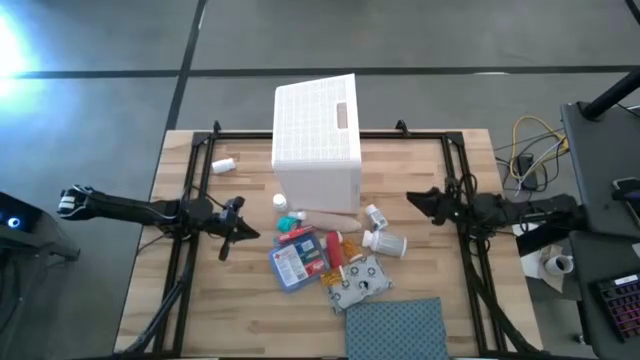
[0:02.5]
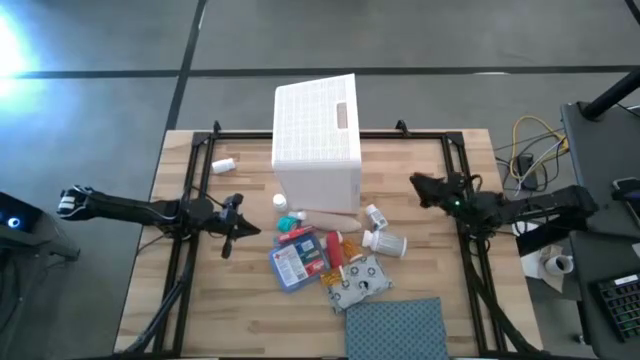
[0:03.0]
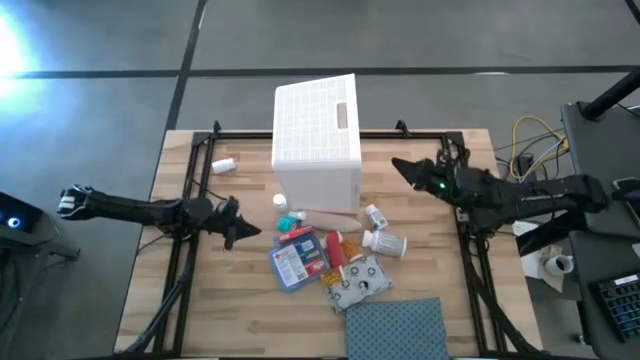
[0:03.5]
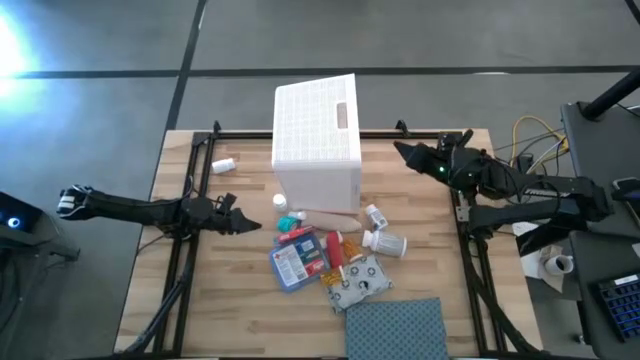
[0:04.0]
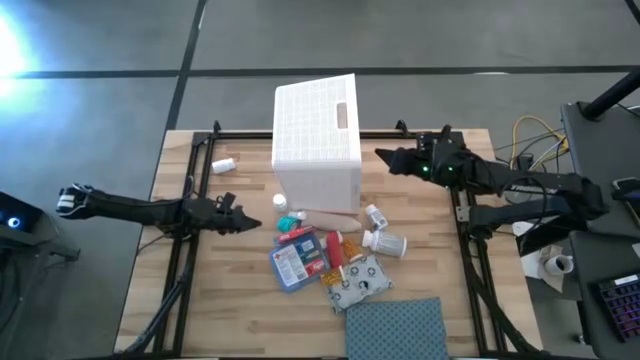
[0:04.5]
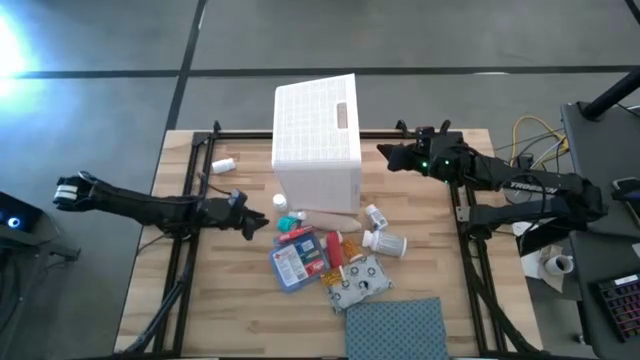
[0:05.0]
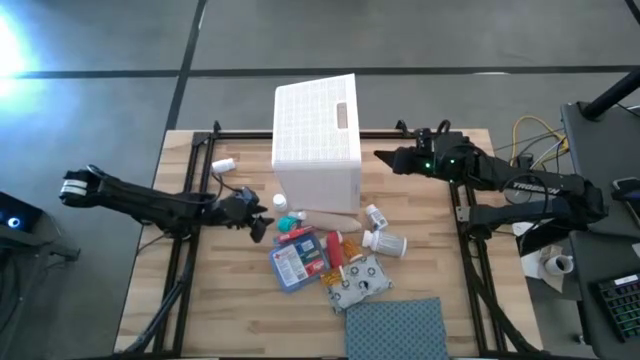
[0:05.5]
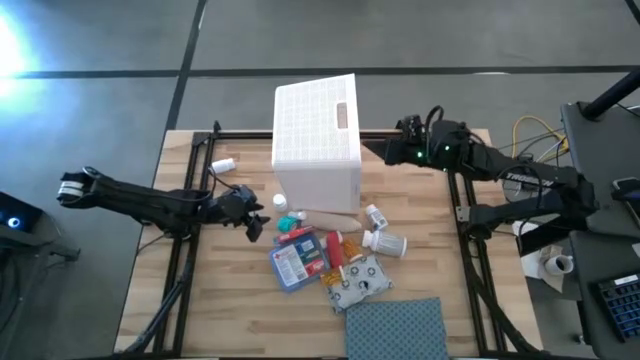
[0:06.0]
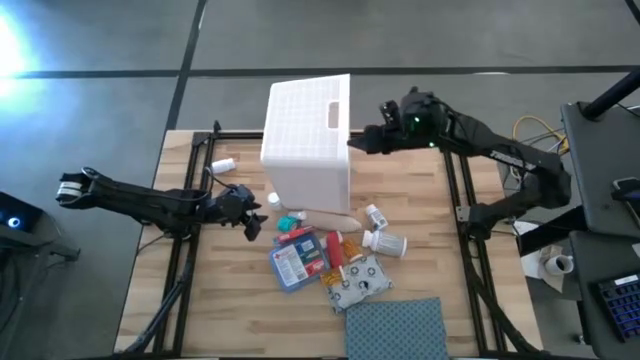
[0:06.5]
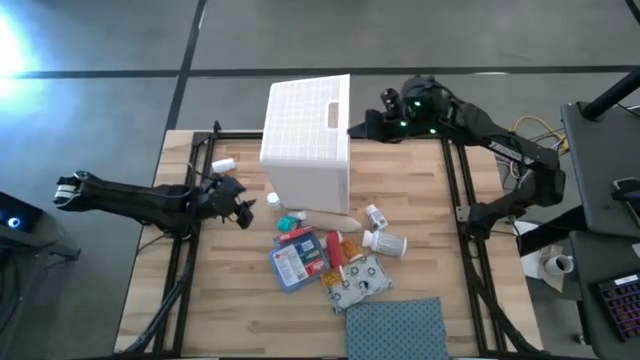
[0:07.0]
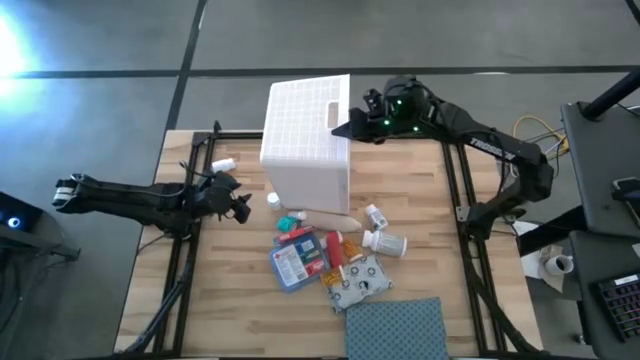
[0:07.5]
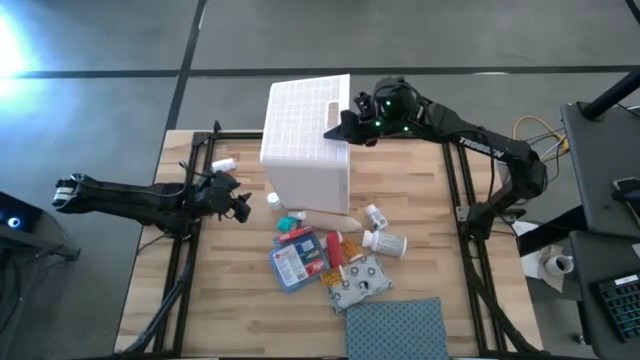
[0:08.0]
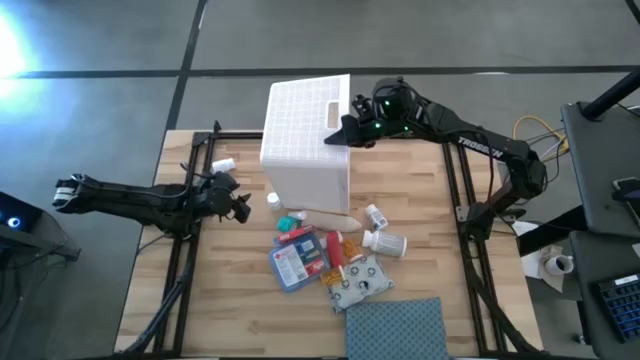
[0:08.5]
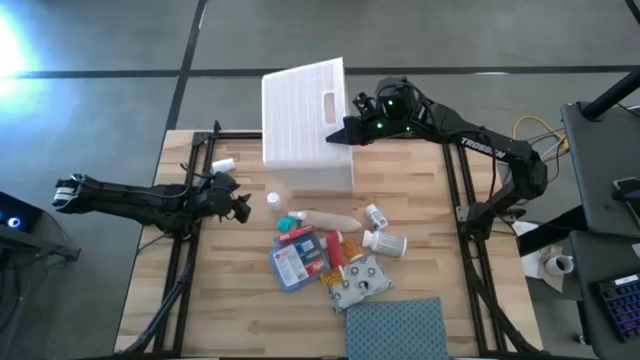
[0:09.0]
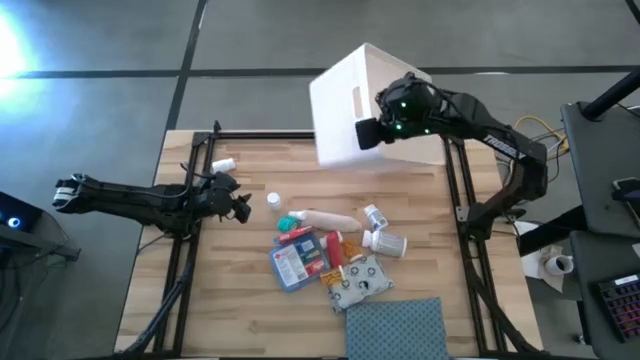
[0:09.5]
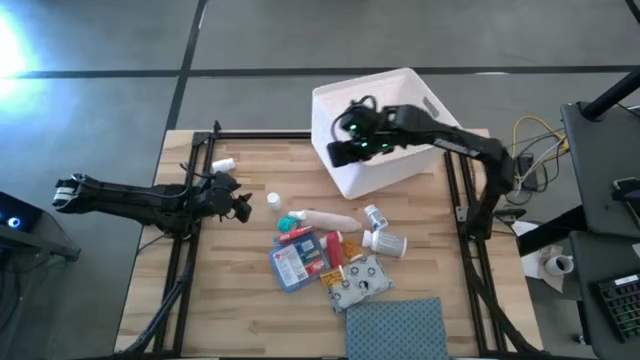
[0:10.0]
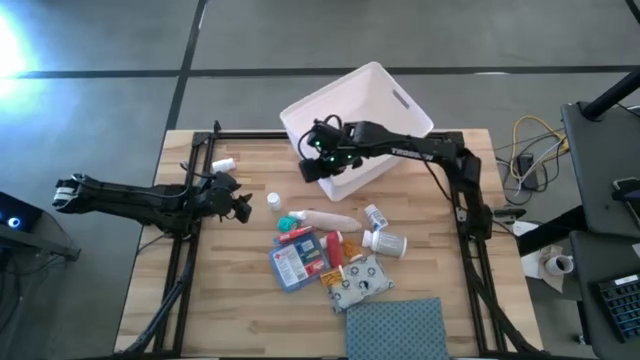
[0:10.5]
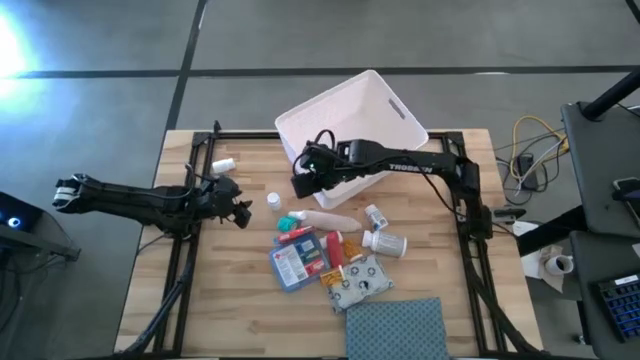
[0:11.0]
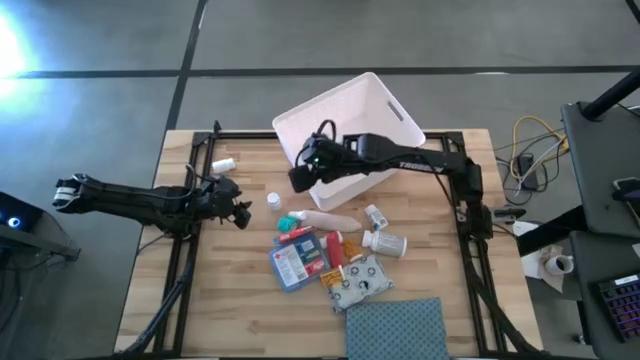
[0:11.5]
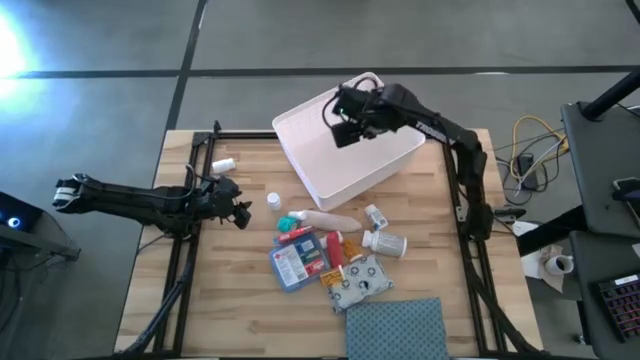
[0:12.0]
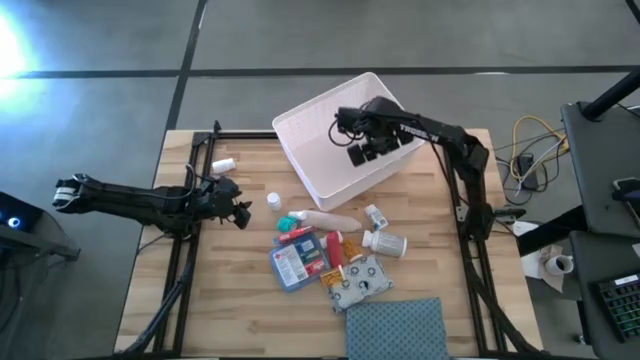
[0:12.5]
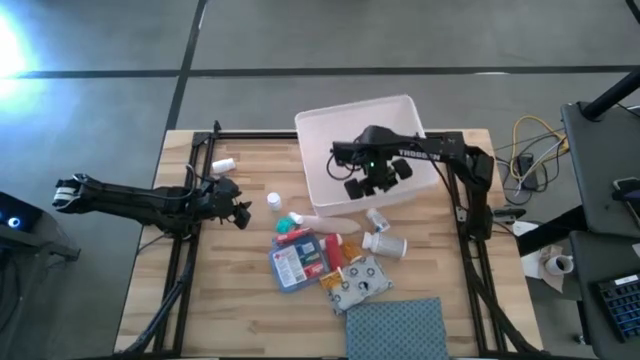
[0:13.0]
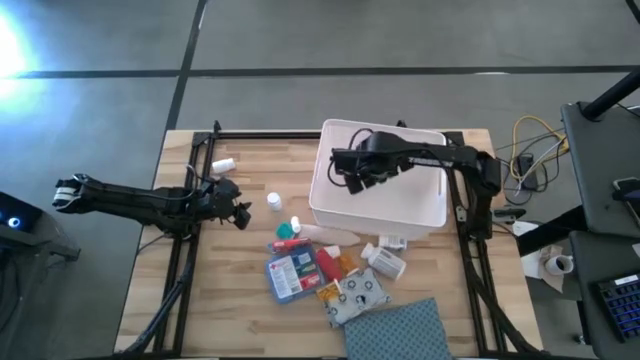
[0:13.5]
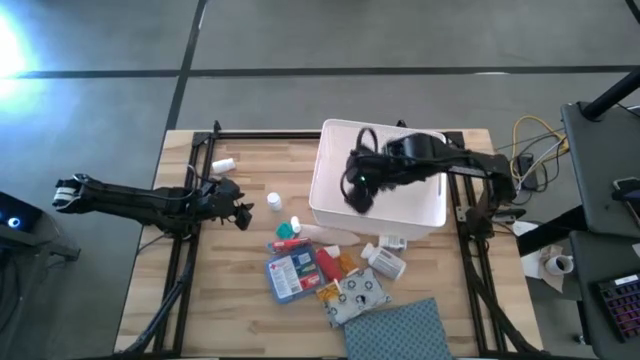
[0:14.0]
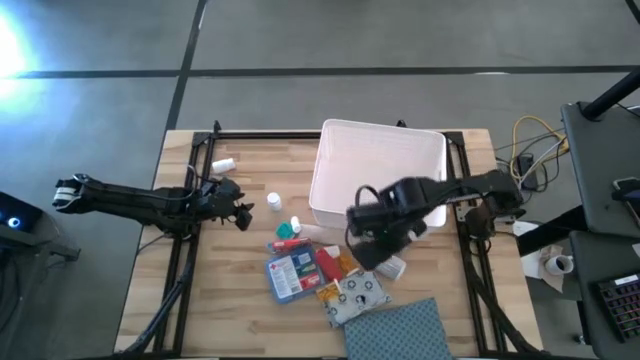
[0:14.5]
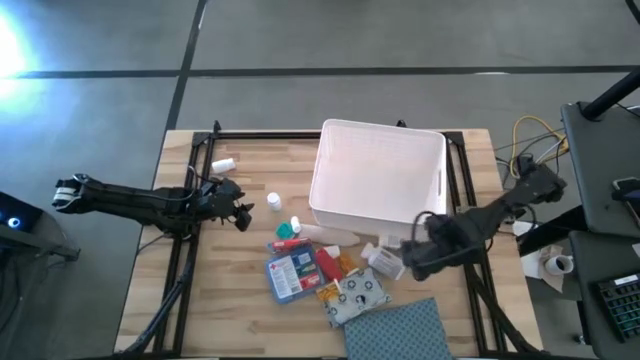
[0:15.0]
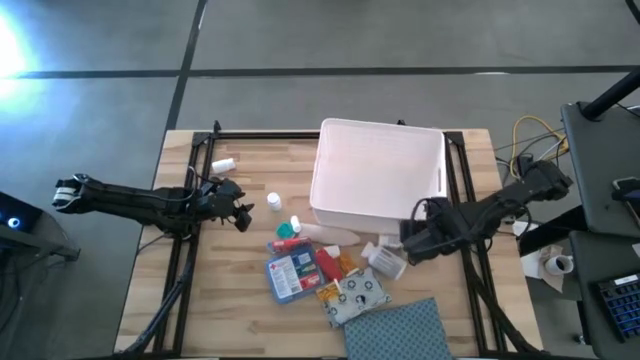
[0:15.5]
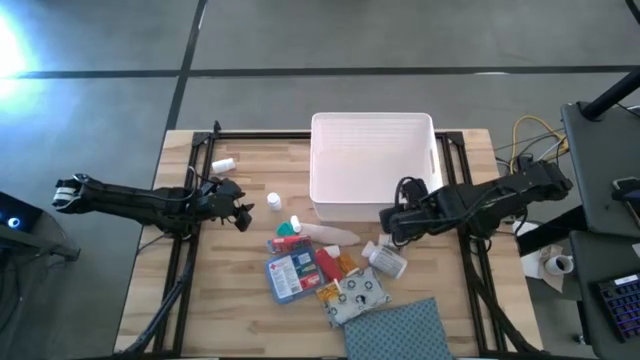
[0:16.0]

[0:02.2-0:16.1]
Task: Pick & place medical supplies in basket/bin
Adjust the white bin

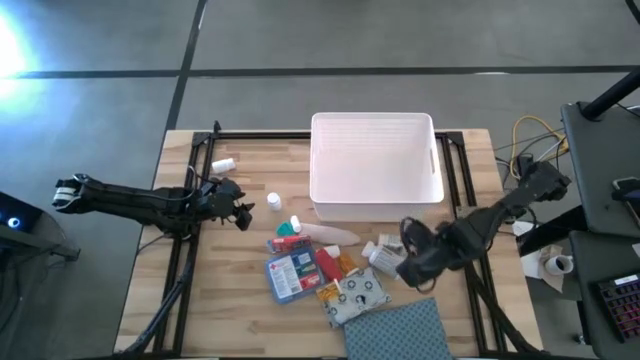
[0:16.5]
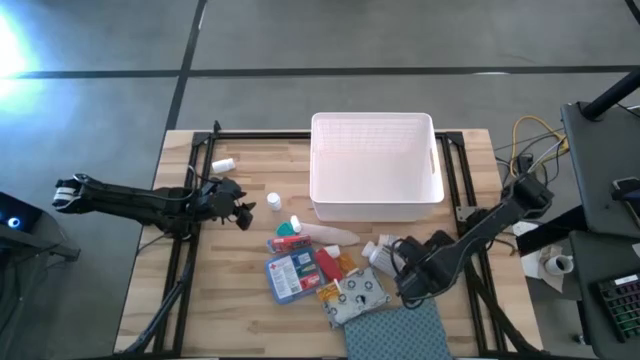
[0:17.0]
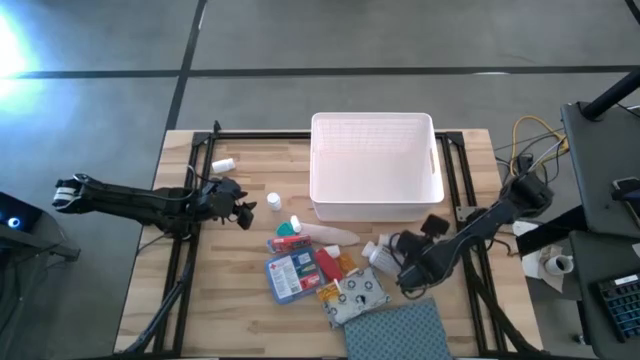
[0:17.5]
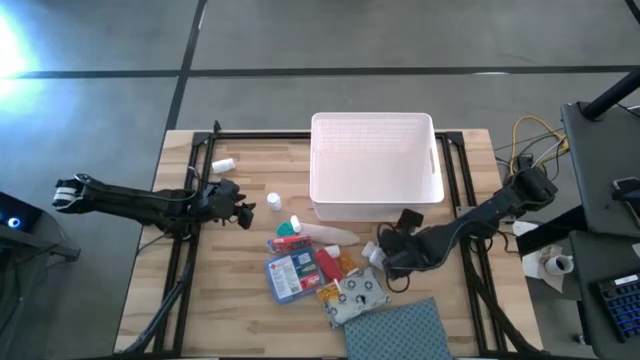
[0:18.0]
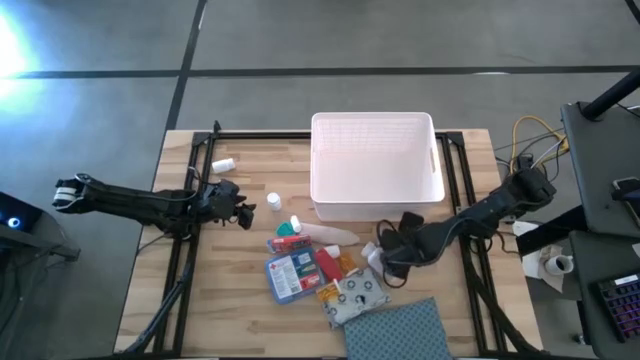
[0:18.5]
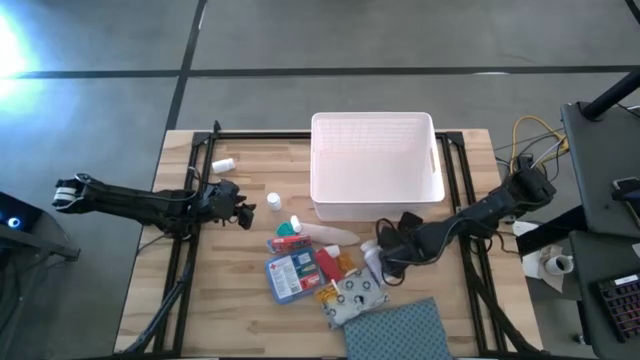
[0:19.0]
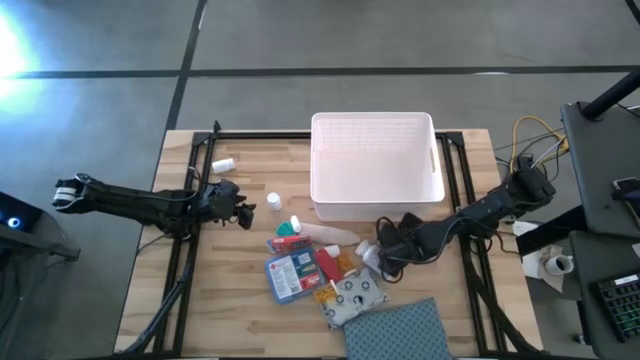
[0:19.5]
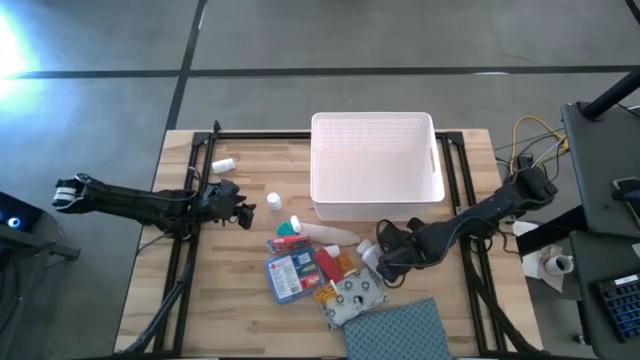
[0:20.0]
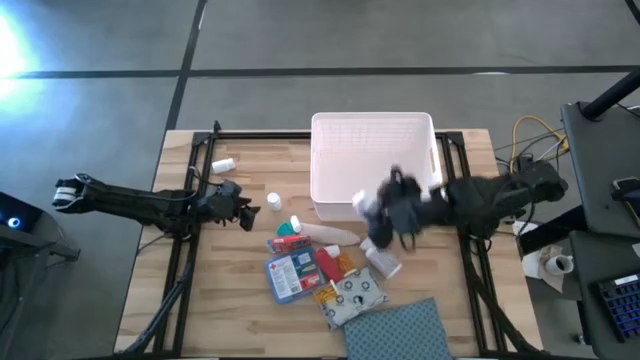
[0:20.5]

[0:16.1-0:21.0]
Put the white pill bottle into the white bin

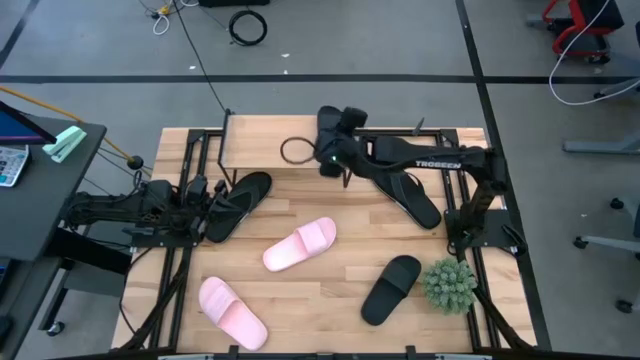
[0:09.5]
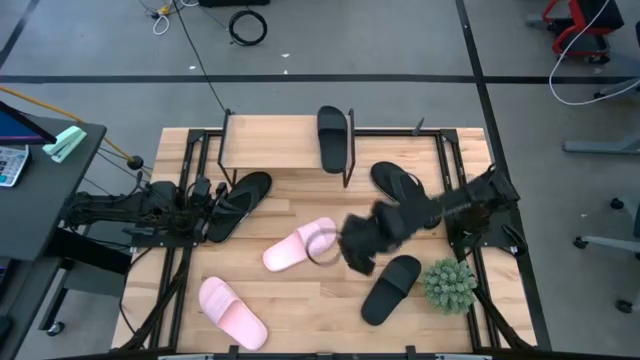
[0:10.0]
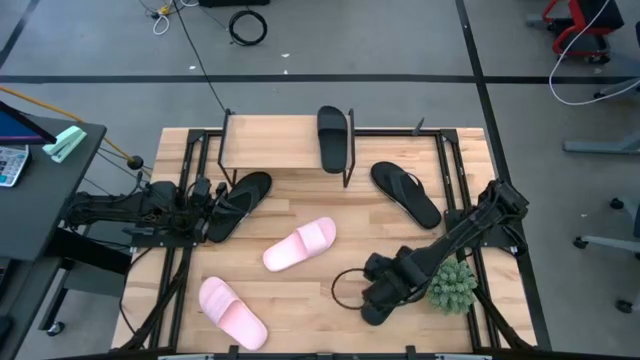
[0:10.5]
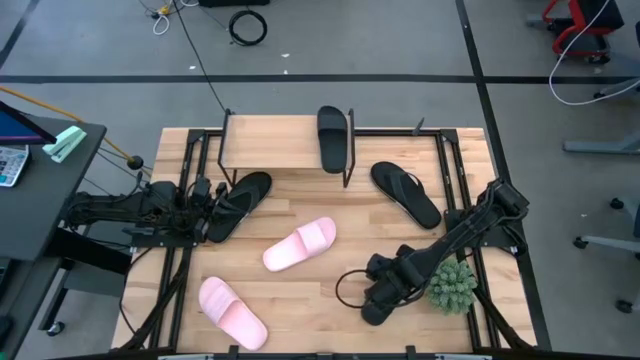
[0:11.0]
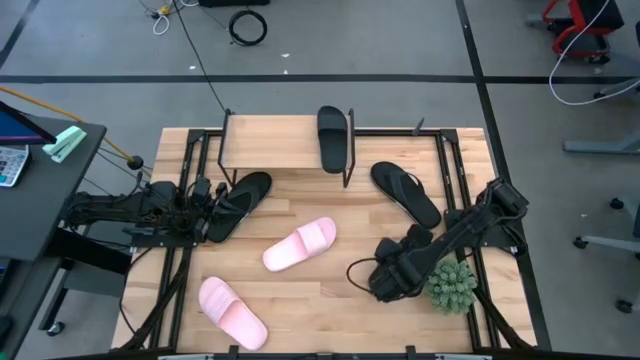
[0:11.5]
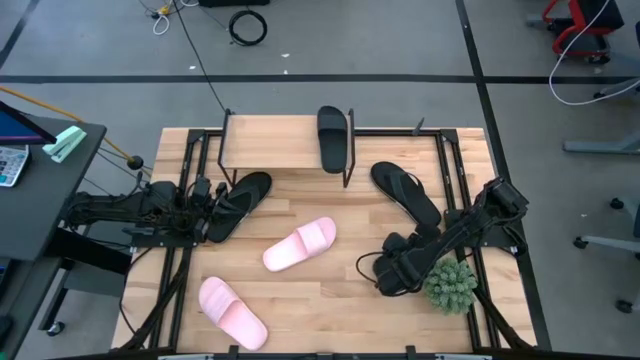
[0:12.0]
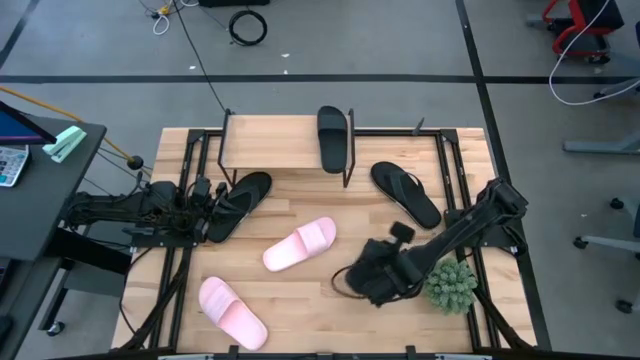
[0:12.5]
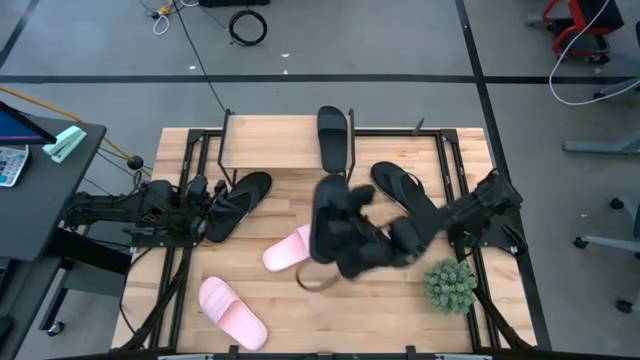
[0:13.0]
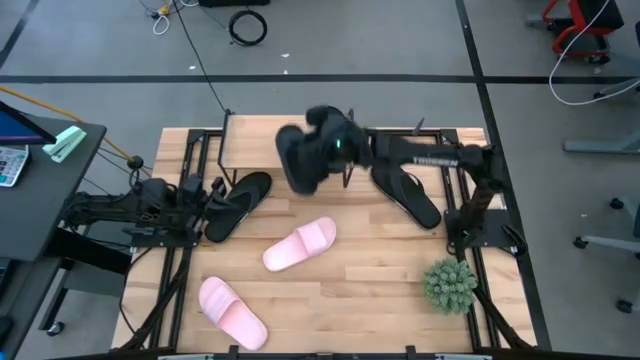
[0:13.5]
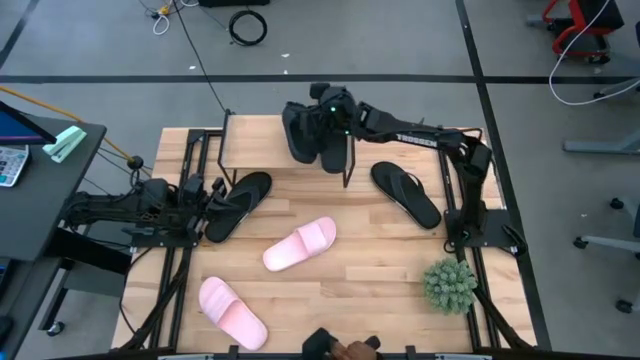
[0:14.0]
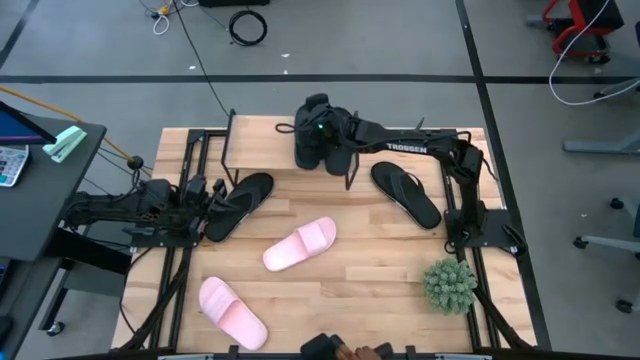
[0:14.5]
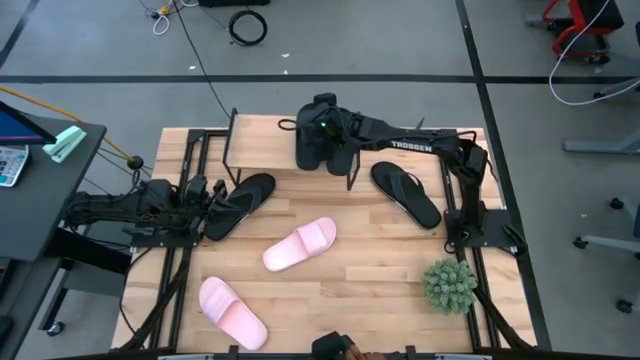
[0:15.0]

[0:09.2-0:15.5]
Task: Pick and place slides into the shelf
Put the black slipper on the shelf
